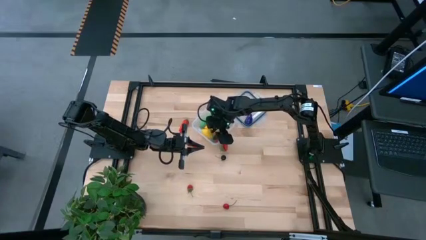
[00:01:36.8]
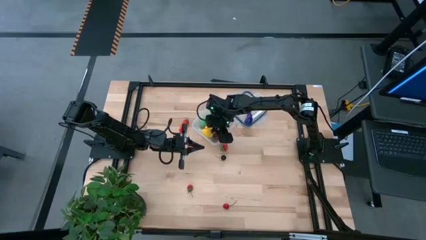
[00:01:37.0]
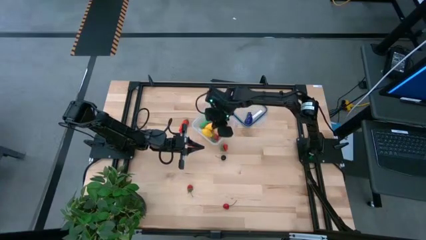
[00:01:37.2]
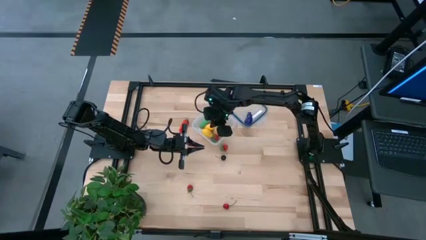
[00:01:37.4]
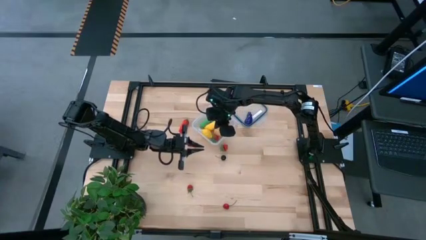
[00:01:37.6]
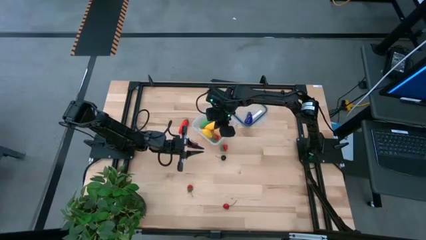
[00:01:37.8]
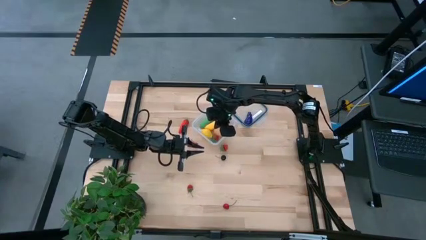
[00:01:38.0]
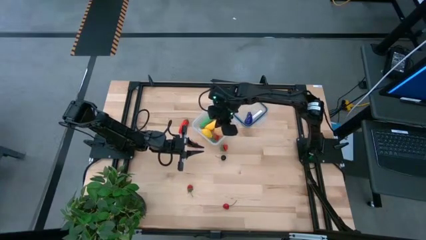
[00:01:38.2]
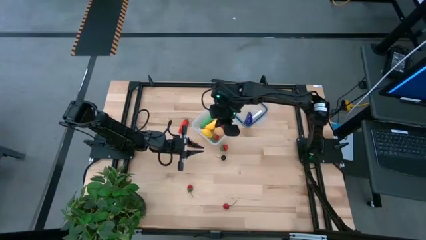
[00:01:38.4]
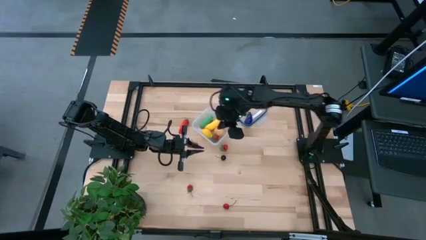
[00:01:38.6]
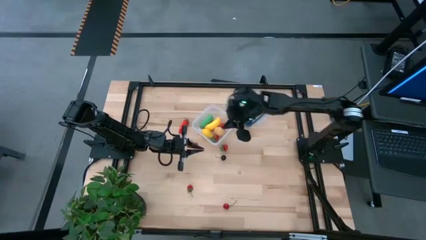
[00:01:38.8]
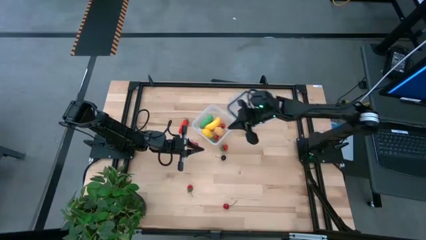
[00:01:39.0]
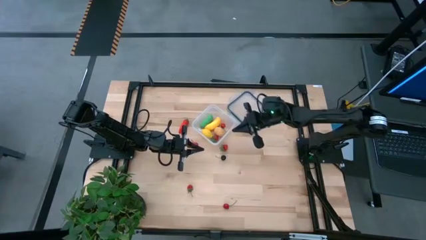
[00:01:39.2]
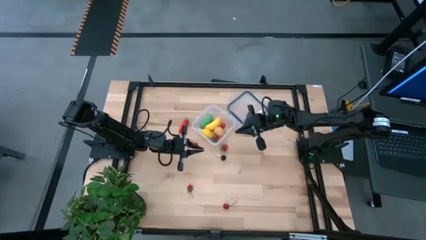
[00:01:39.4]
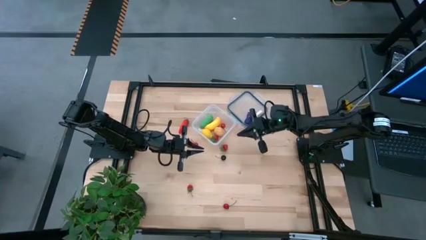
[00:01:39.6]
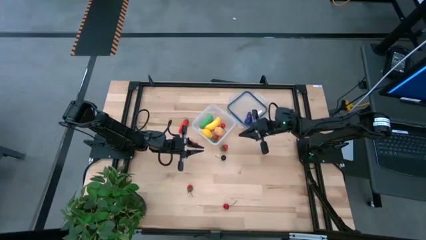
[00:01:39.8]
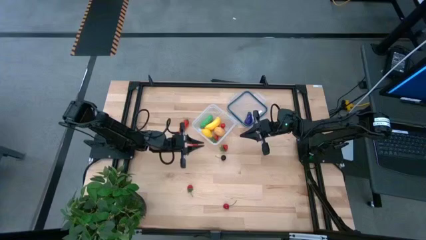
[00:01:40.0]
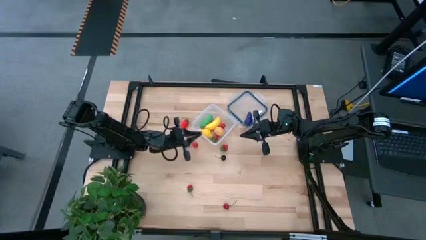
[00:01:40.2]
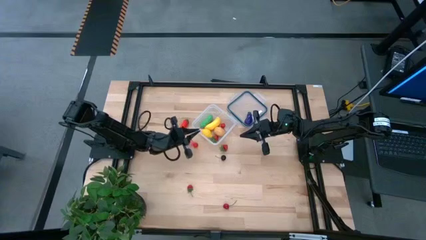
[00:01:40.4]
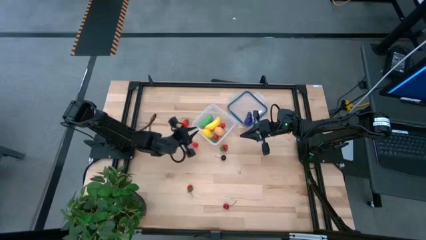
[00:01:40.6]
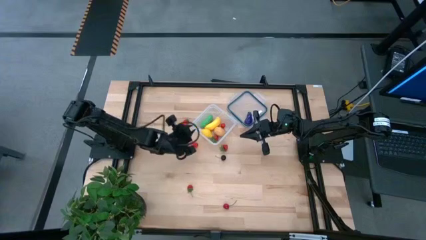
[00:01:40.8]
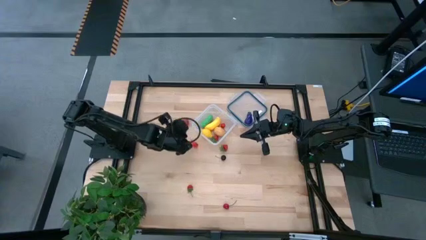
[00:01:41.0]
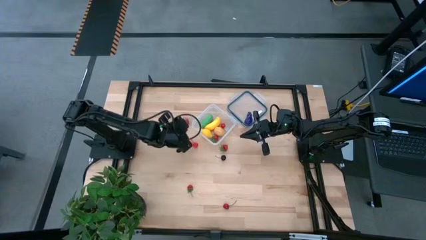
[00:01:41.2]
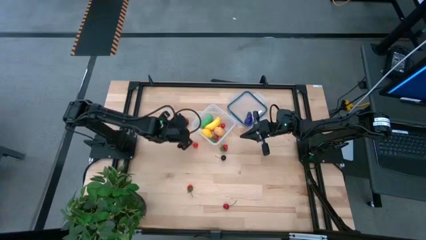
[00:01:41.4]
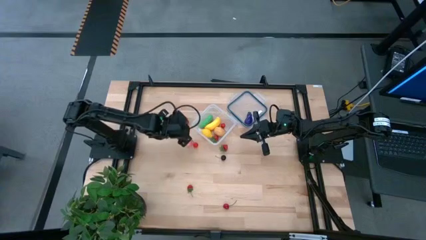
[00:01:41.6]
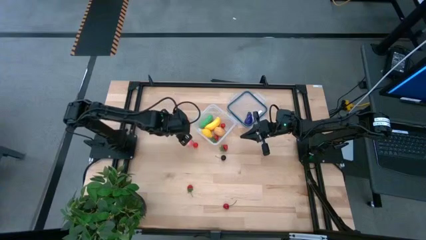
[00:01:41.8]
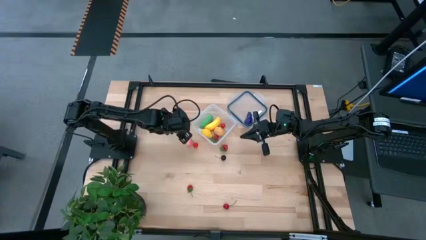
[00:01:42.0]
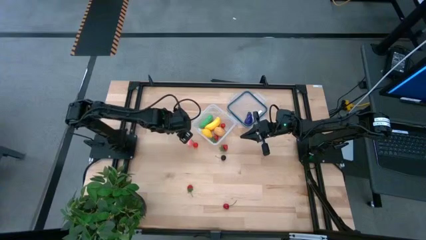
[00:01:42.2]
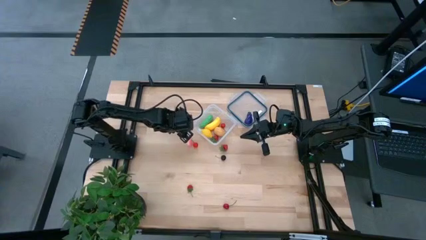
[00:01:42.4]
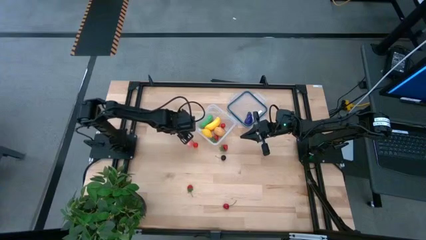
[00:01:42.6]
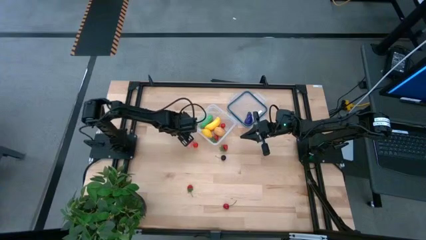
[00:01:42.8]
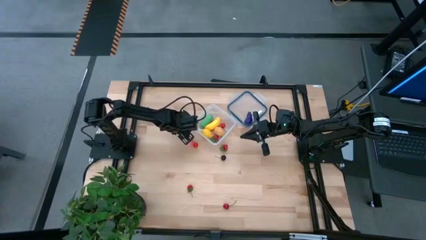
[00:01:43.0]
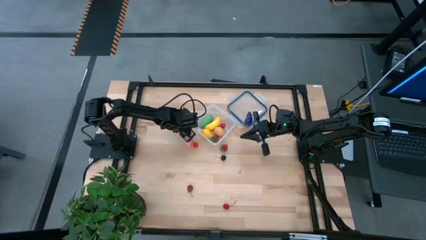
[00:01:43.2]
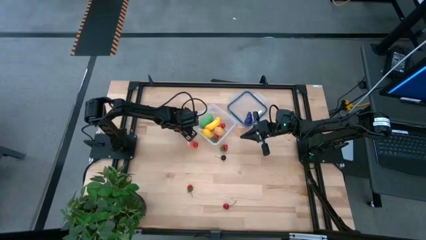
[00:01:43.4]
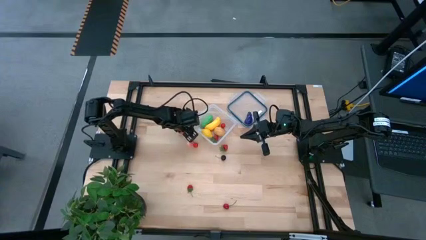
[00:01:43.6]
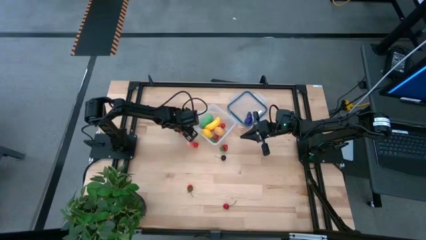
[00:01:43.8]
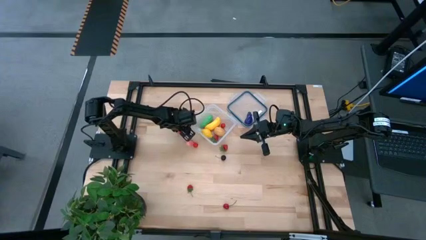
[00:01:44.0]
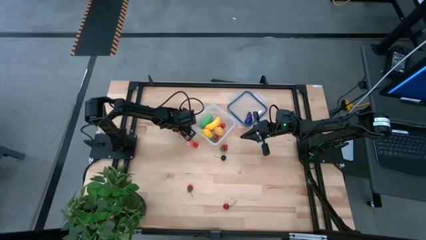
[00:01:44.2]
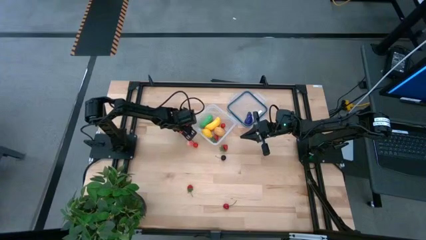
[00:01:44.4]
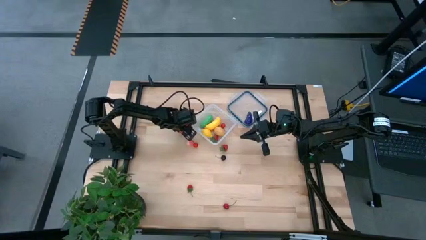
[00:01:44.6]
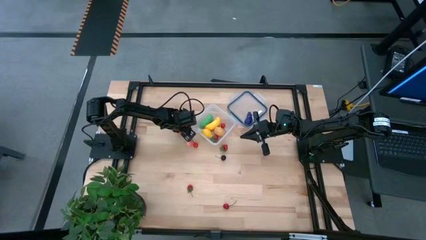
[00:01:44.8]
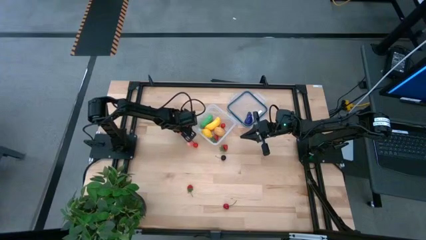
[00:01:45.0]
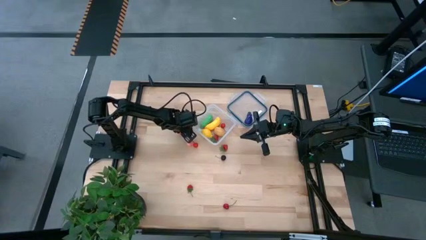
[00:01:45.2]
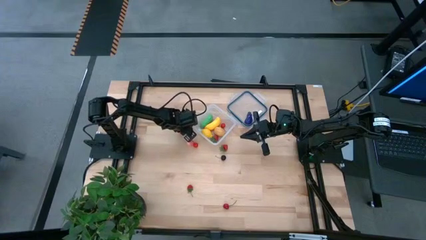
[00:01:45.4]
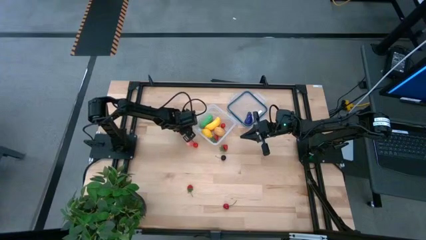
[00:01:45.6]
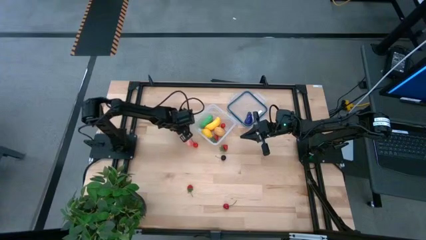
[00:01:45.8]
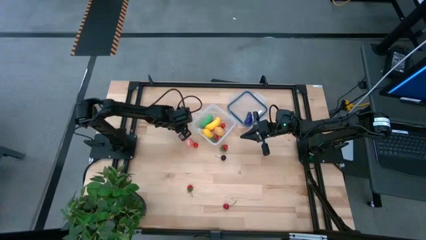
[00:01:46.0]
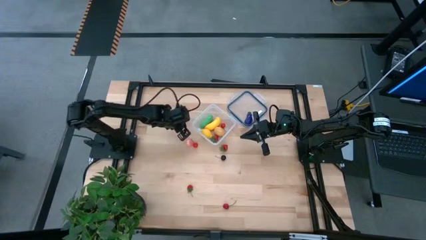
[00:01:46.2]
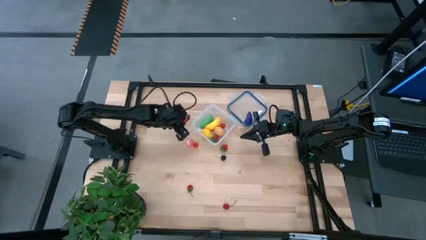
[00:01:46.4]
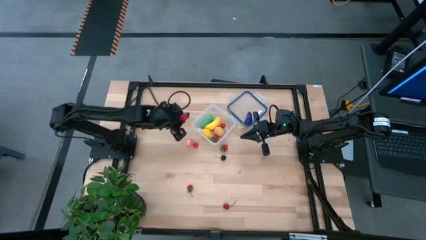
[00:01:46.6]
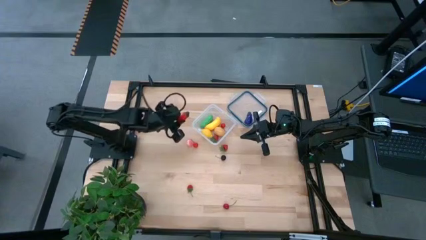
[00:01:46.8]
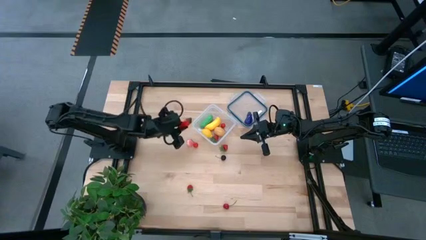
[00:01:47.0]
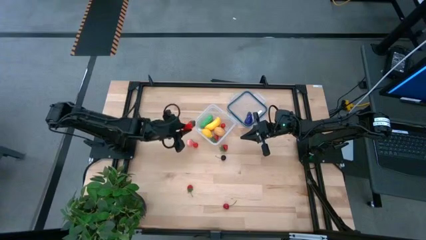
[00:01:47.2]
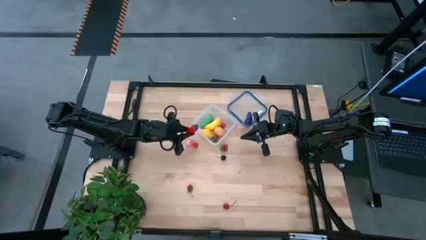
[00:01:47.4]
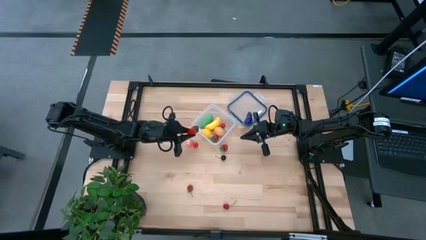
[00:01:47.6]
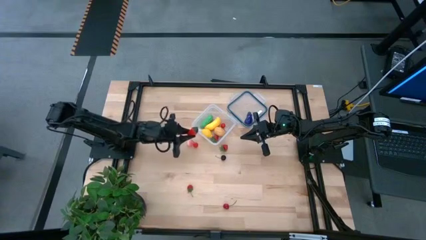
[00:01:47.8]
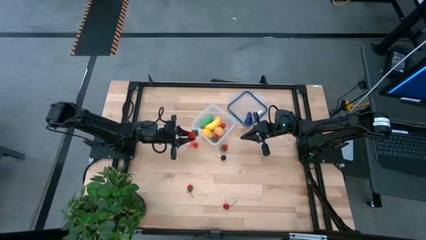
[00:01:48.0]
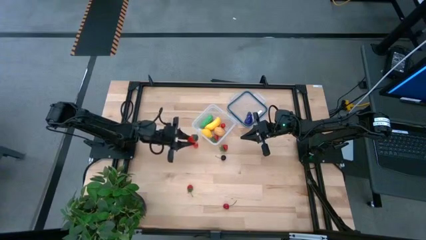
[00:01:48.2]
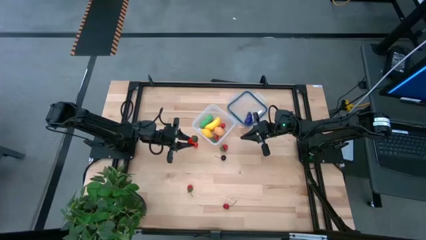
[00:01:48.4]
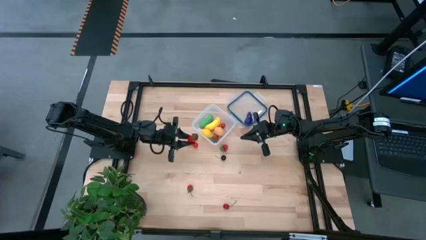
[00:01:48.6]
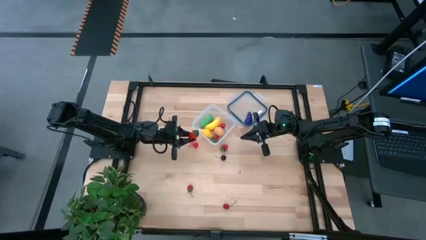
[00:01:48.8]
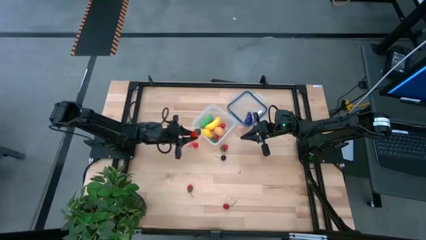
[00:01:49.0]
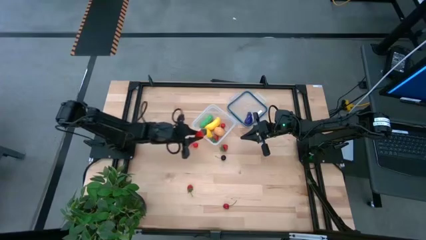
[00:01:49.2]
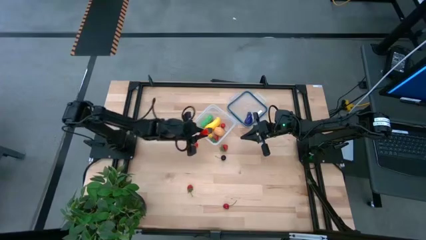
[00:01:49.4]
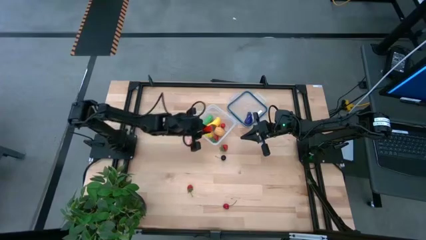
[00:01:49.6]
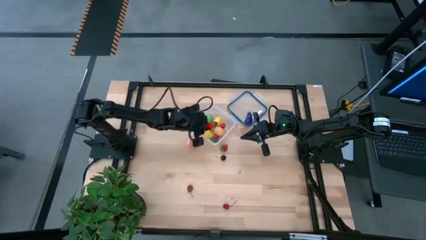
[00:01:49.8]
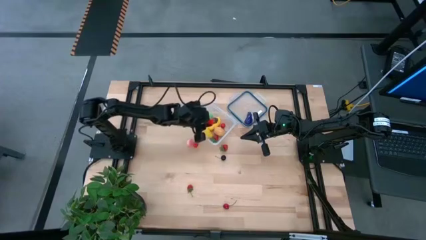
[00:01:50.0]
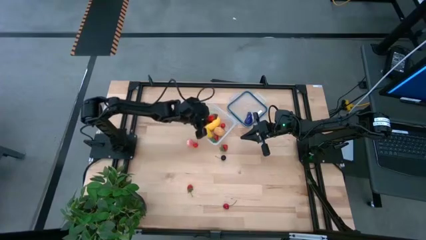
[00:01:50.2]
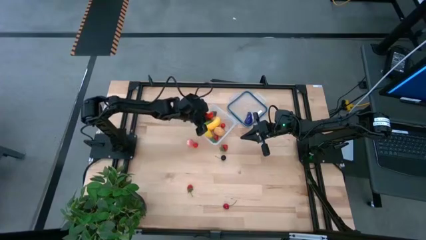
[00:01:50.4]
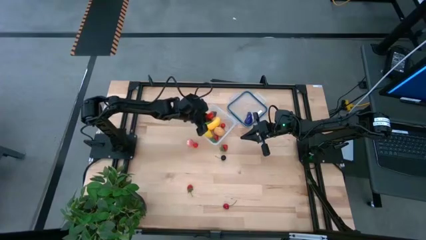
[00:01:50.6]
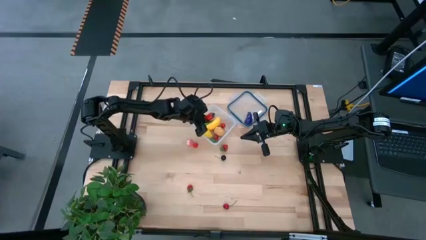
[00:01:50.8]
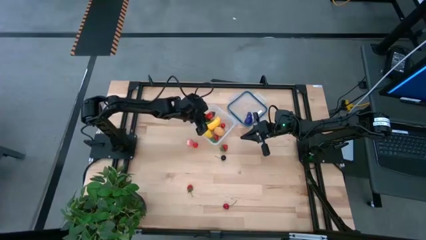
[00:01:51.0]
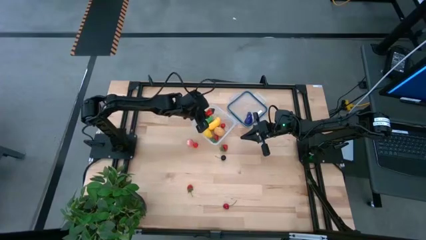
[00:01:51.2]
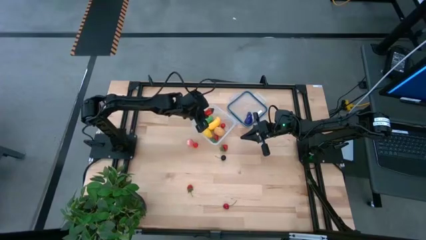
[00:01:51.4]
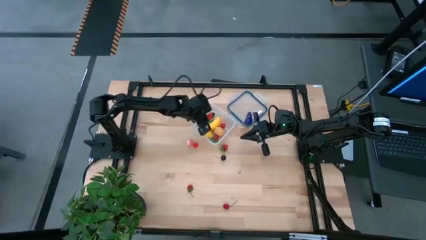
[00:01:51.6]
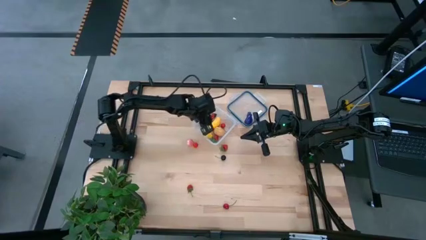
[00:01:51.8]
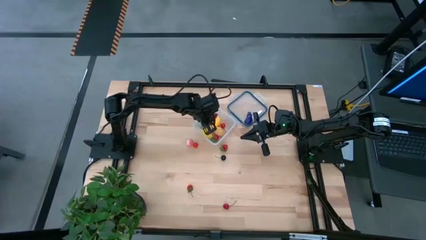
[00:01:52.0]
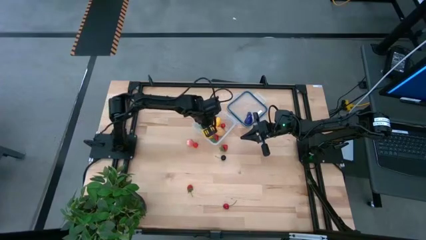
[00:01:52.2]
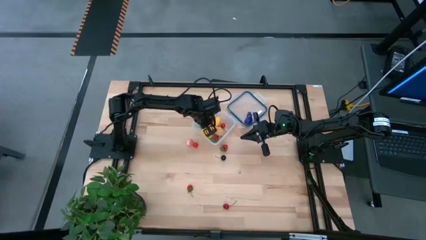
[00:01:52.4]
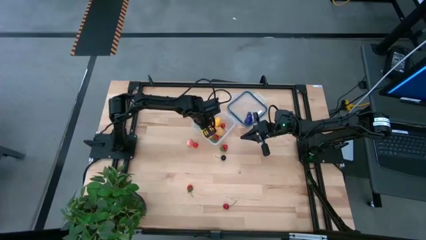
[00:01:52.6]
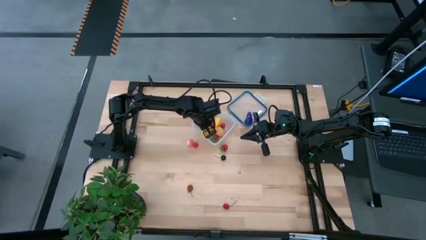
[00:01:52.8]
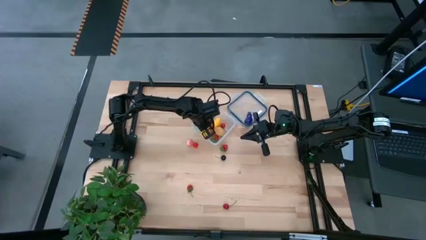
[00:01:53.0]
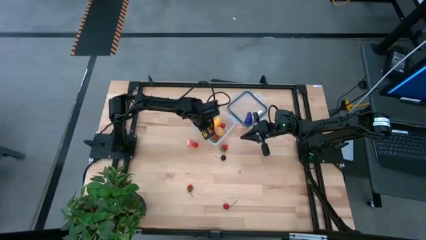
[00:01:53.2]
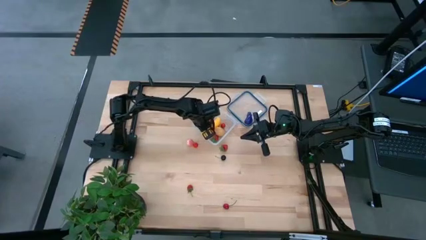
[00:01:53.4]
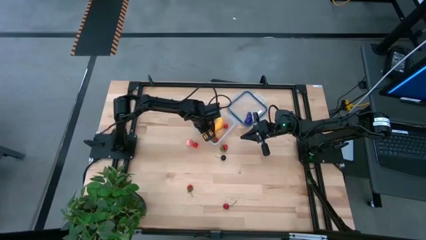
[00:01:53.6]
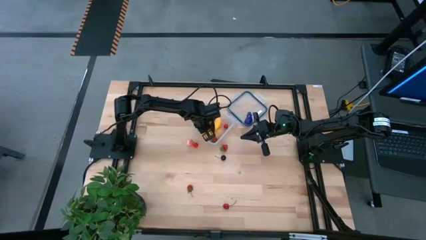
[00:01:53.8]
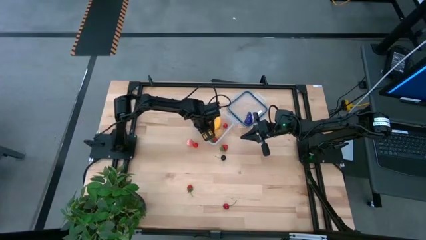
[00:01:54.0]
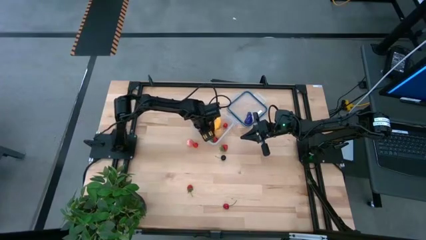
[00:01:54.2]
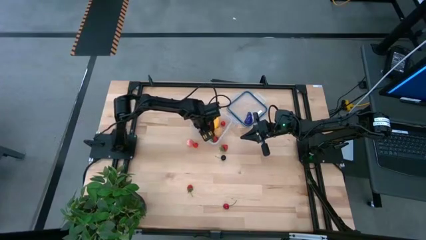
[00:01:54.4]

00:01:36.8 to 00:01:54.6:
Task: Pick and placing Produce into tupperware
Put the red chili pepper into the transparent container
